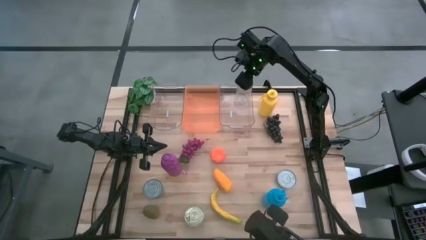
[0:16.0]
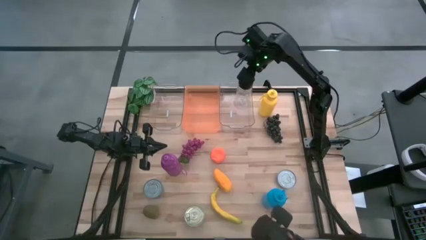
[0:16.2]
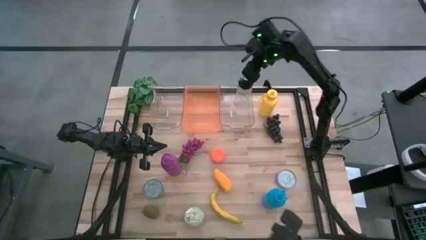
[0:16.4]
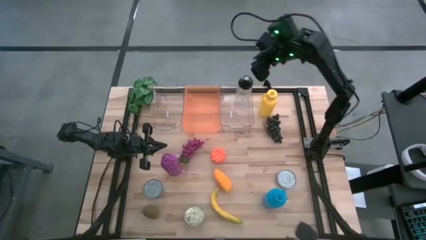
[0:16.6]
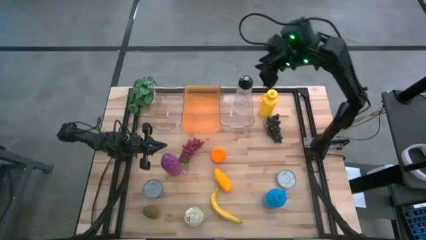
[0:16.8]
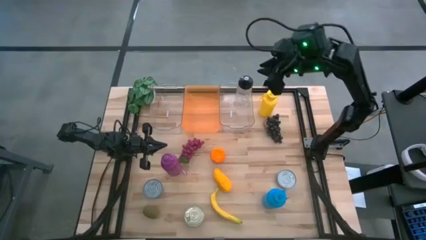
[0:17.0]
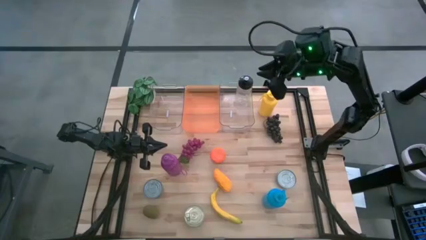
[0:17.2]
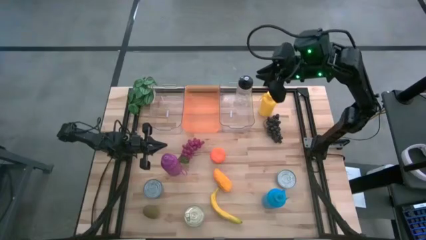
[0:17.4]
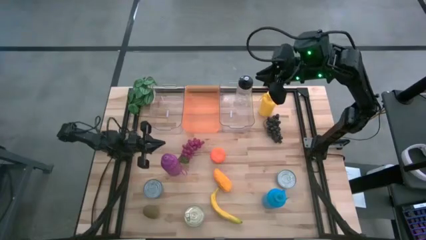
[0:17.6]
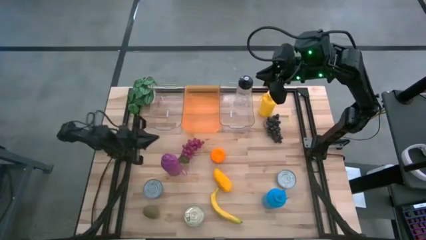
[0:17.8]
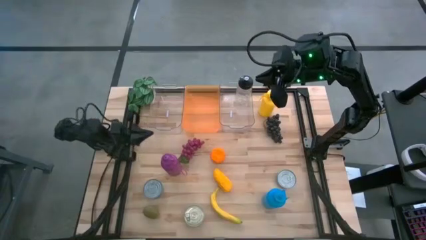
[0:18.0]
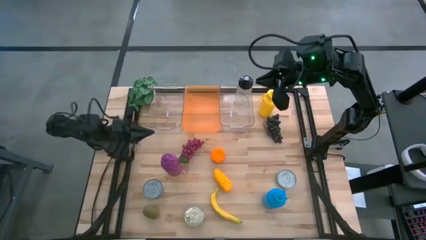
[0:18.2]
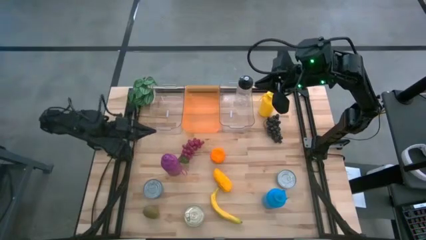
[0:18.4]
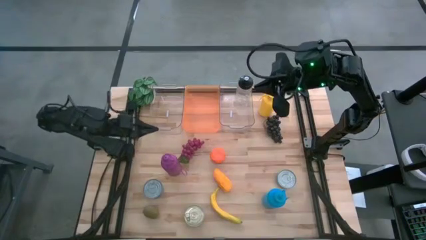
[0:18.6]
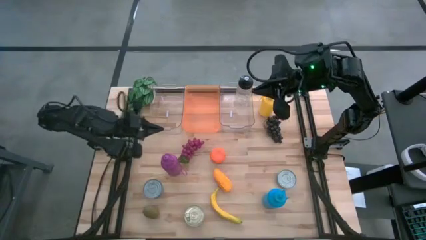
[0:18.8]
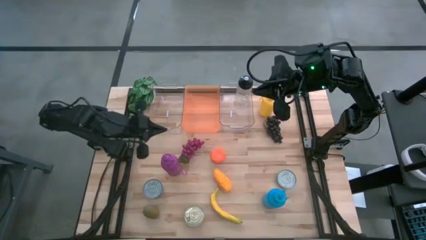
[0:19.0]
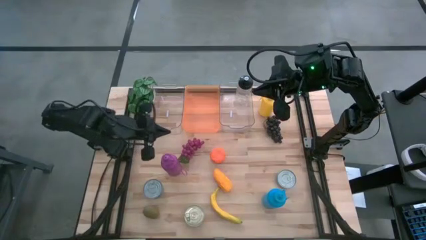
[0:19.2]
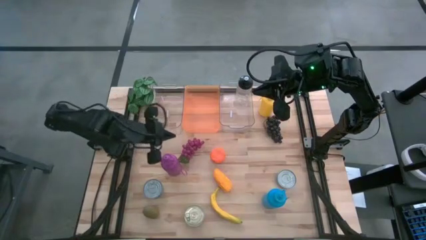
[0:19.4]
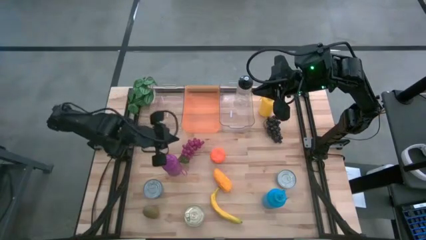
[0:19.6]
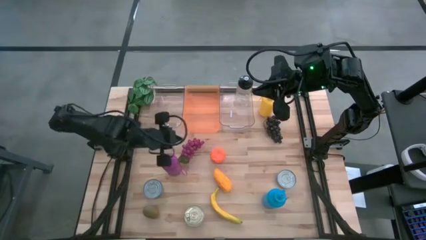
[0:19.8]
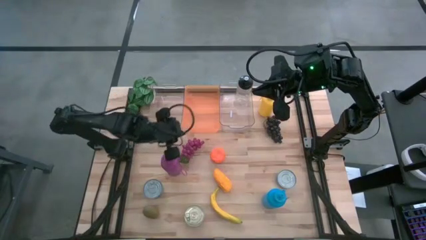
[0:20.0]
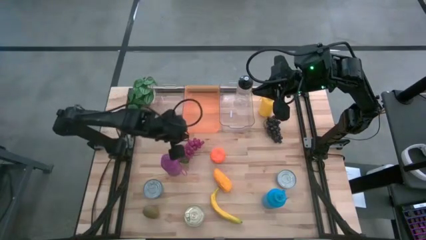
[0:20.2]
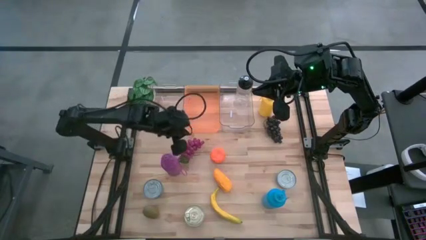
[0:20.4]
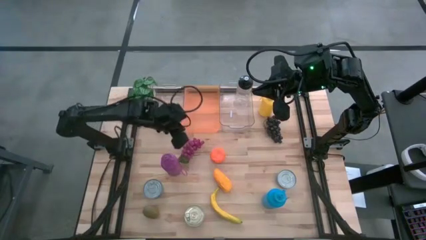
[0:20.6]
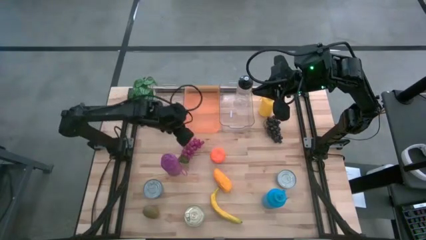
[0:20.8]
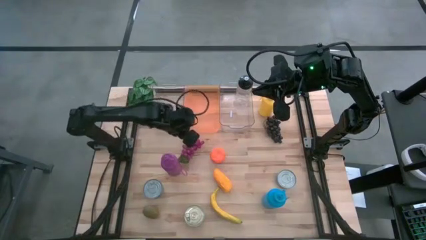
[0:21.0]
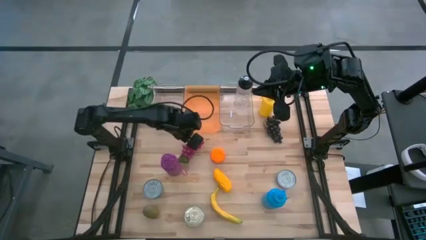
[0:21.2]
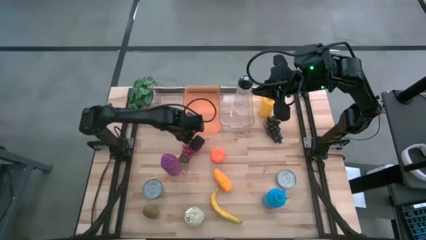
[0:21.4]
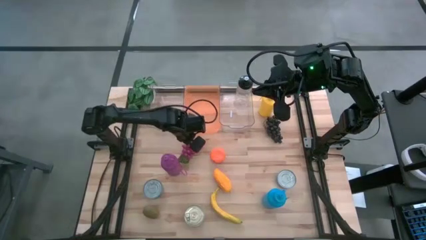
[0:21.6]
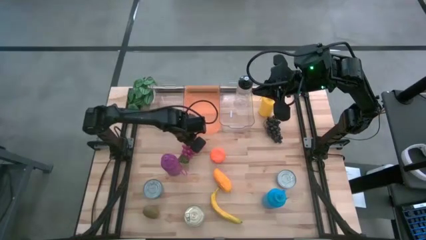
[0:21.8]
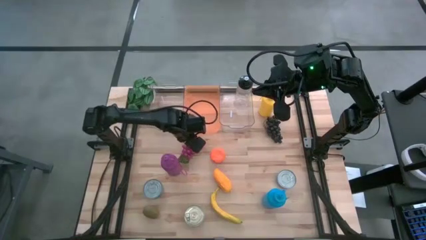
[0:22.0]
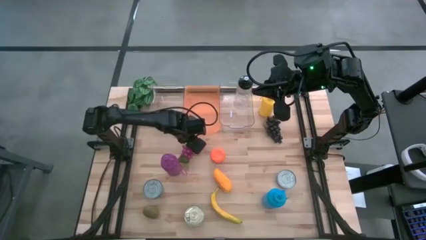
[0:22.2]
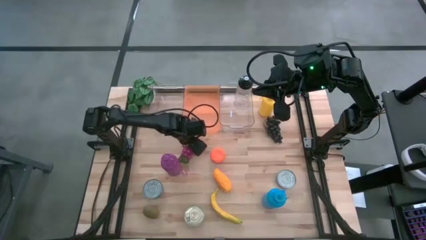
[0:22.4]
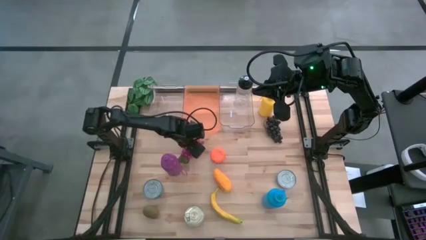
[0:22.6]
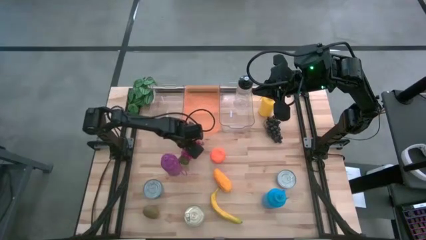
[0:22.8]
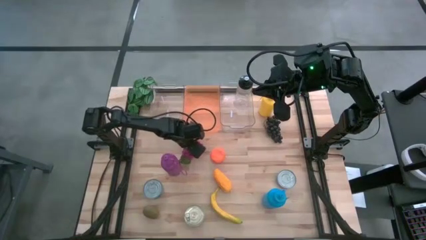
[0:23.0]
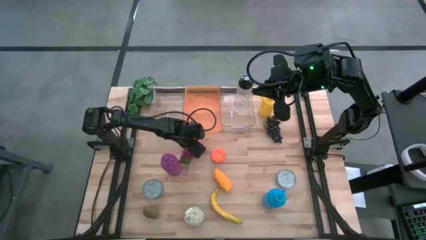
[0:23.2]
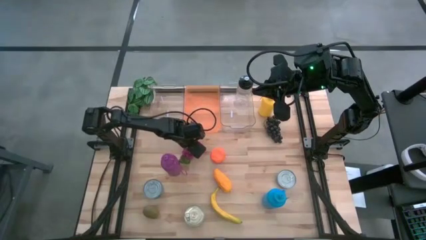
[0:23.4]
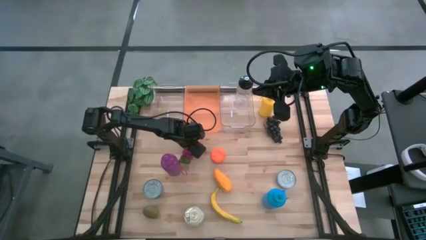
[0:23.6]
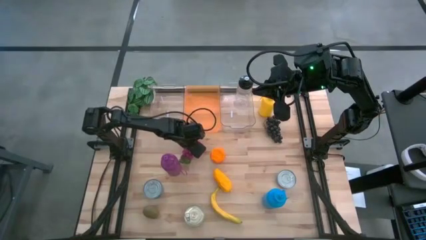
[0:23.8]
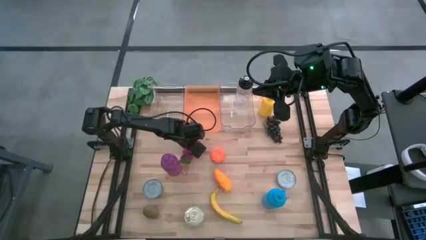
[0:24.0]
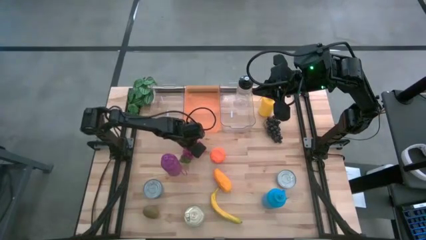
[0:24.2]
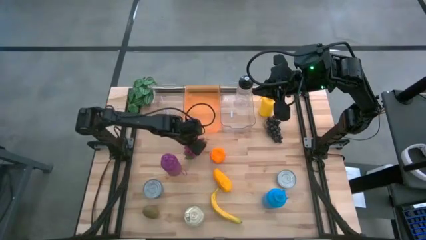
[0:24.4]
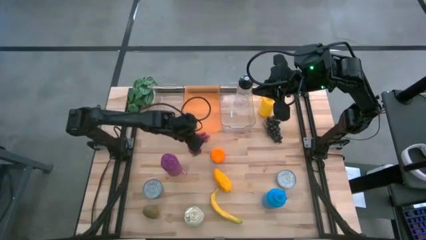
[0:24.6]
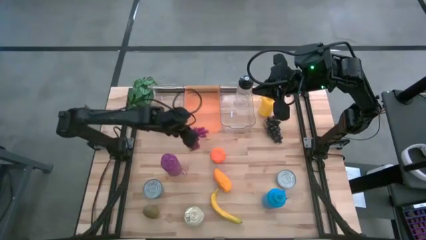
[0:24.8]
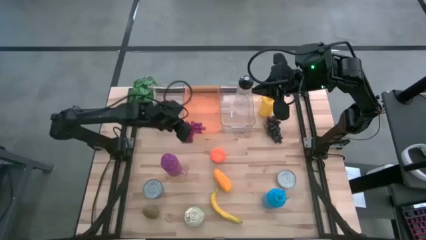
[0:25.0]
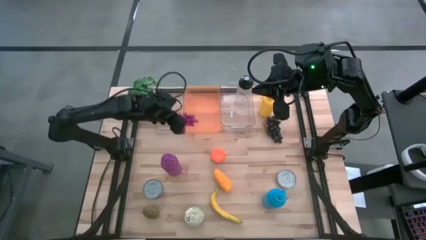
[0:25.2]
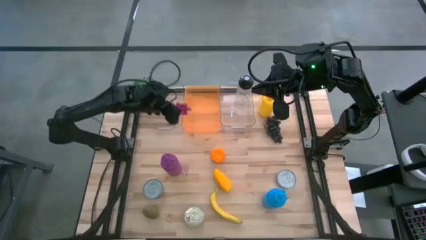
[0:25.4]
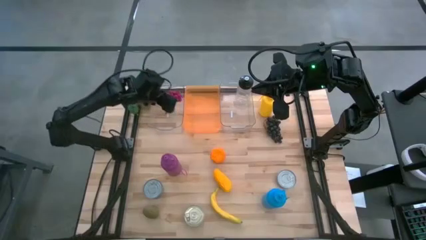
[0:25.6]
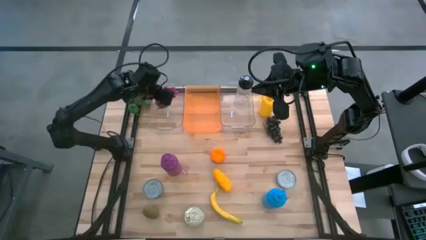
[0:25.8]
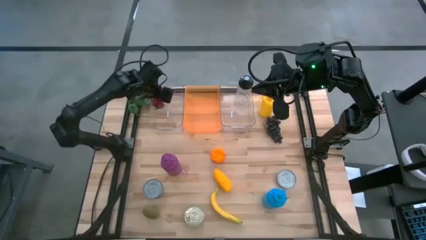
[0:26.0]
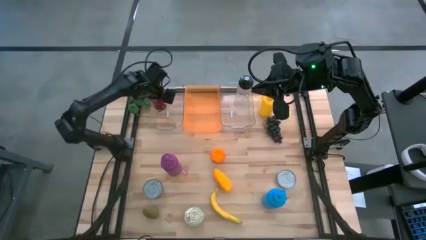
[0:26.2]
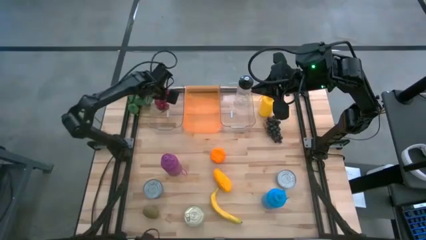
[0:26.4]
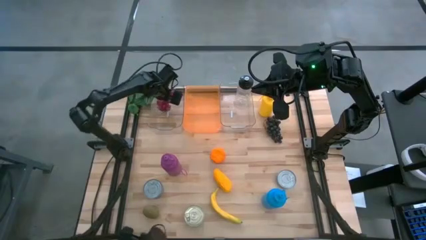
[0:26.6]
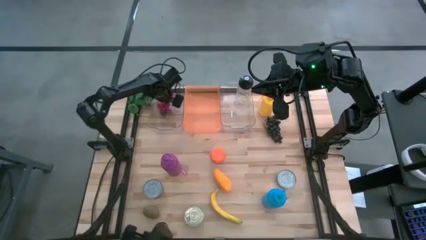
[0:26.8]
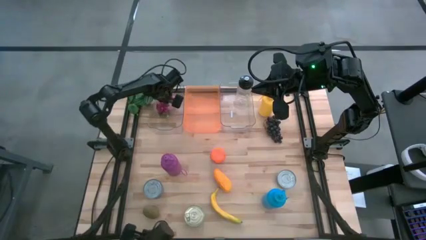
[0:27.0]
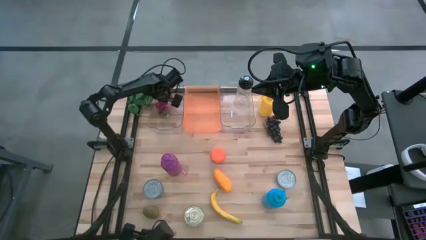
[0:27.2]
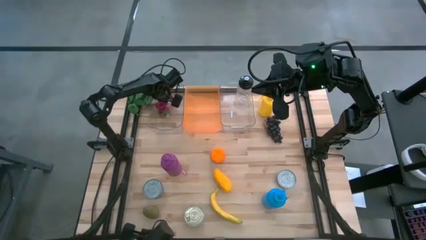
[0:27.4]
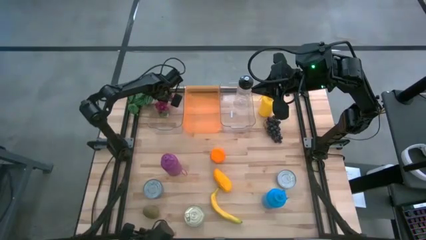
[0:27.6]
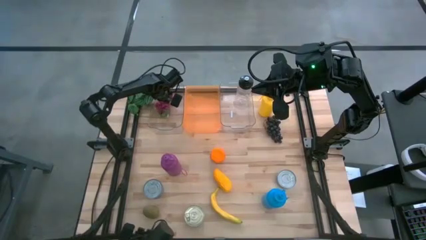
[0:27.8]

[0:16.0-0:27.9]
Task: Pick & Place Food Item
Put the purple grapes into the left transparent bin
